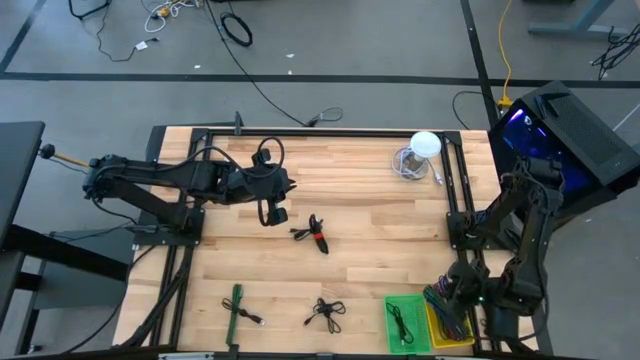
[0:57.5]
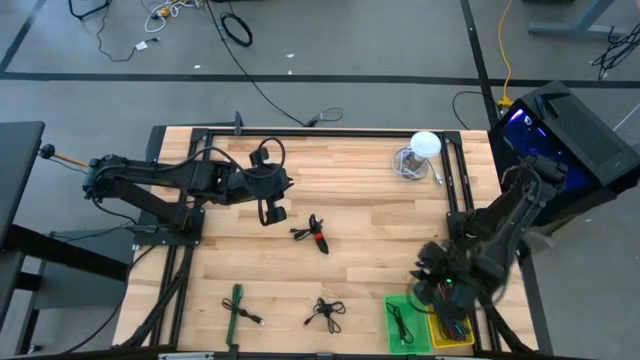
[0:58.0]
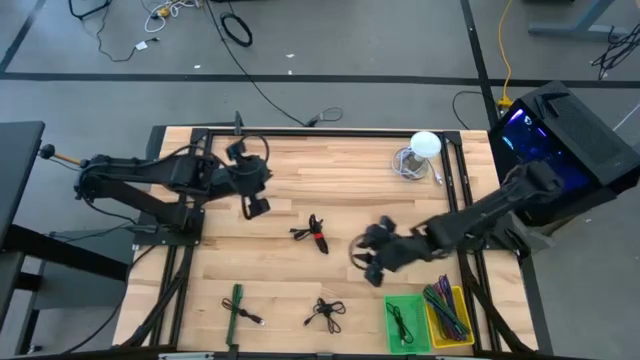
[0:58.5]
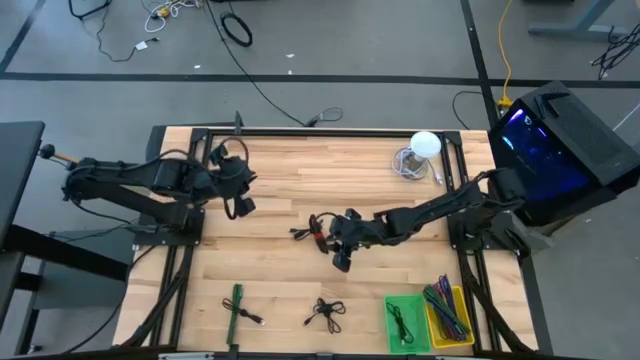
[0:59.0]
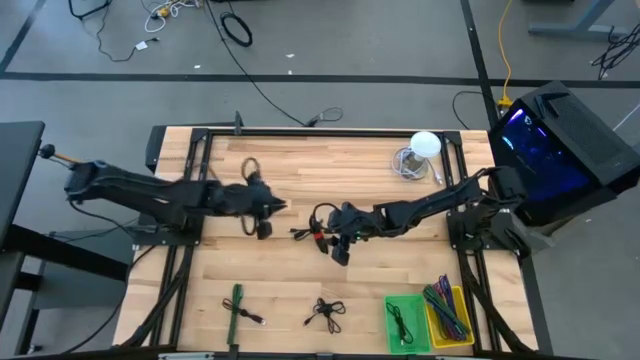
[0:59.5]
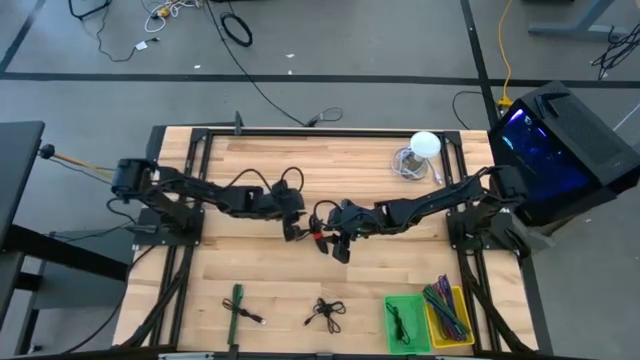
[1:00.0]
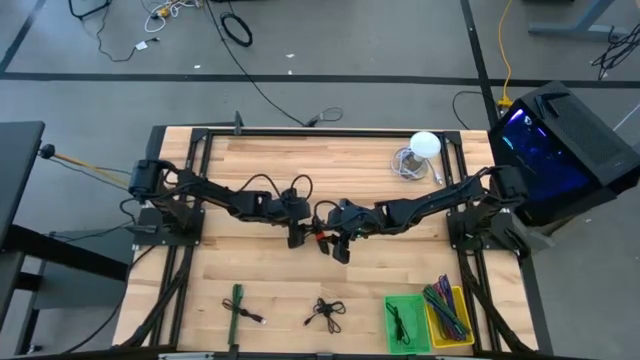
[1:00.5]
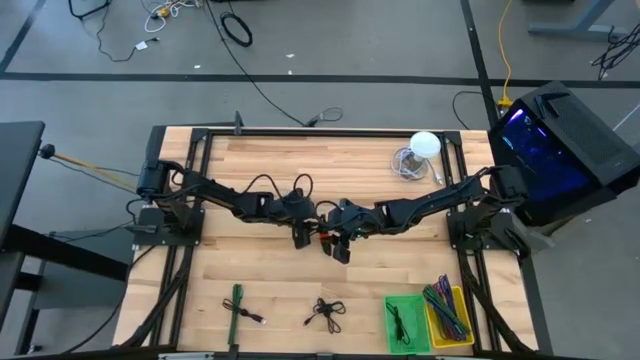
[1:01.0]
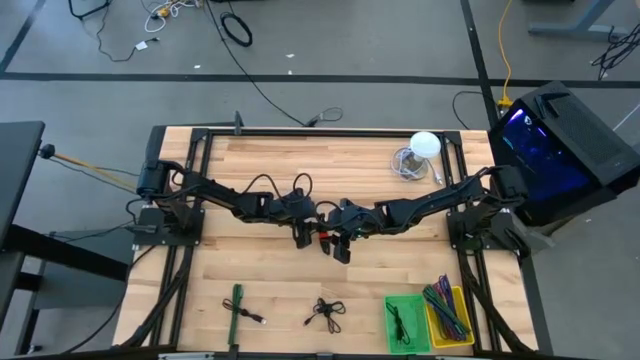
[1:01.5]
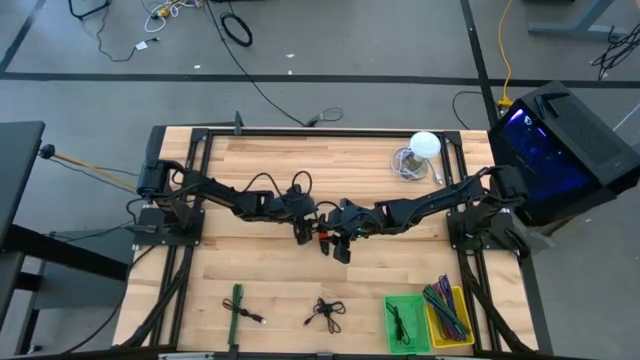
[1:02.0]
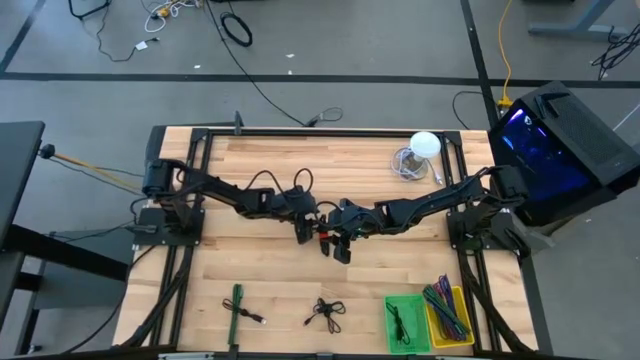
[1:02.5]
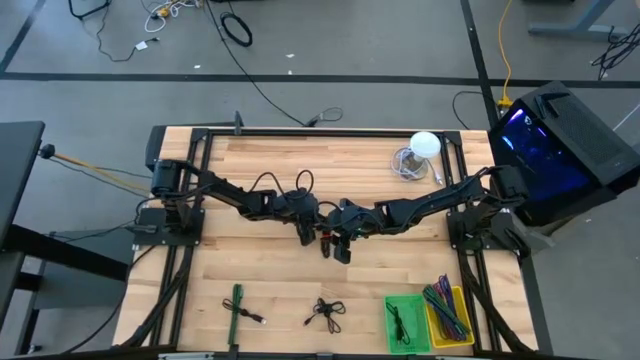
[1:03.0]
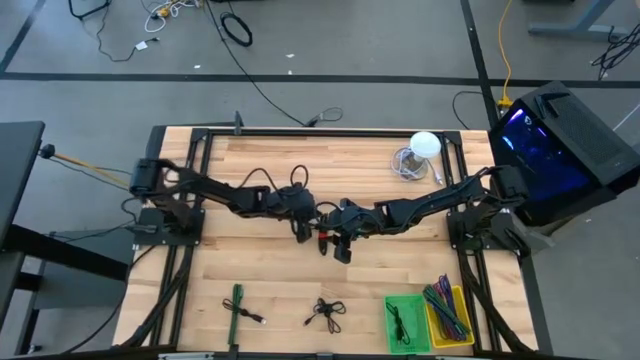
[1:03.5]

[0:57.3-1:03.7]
Task: Pick & Place USB Port
Put the black charger cable into the green basket

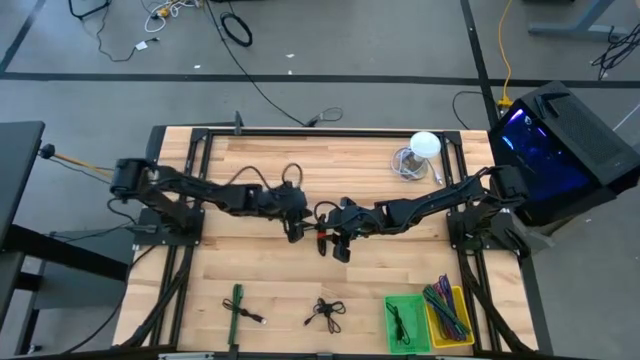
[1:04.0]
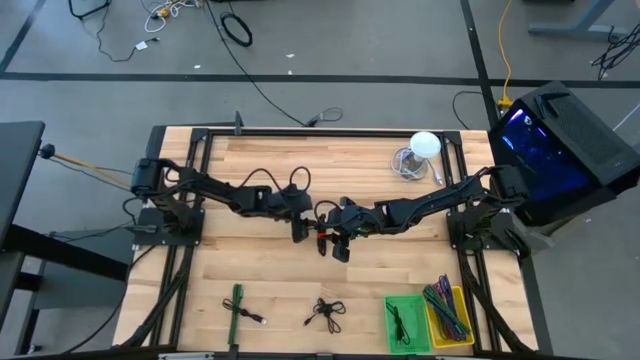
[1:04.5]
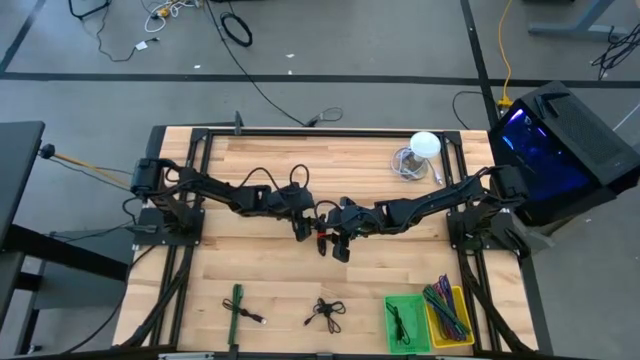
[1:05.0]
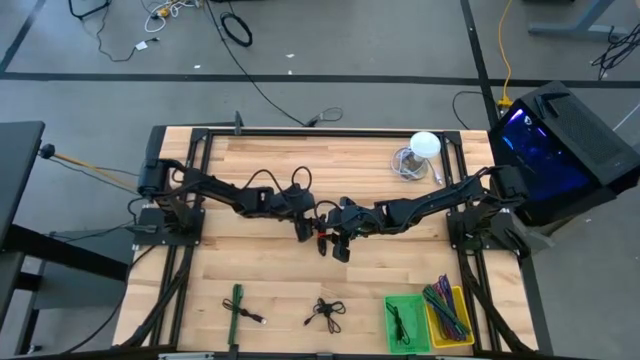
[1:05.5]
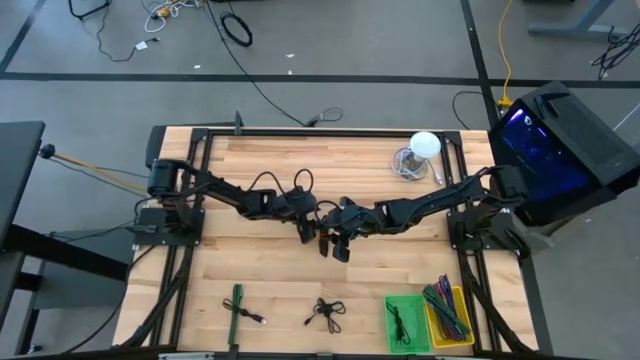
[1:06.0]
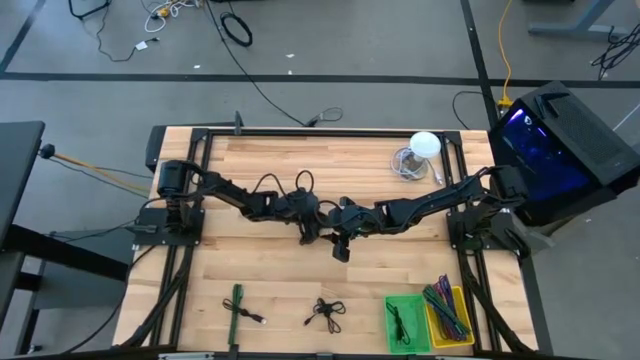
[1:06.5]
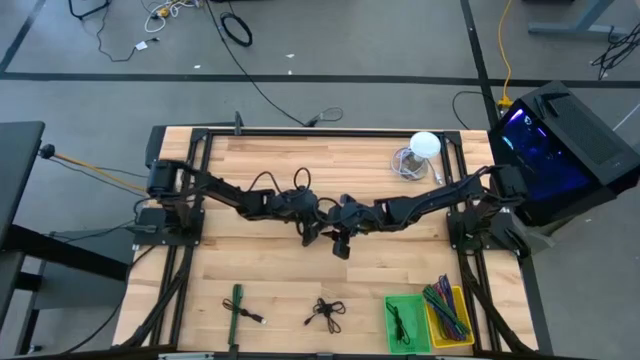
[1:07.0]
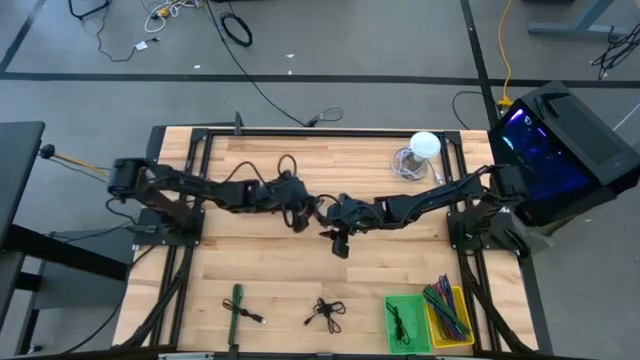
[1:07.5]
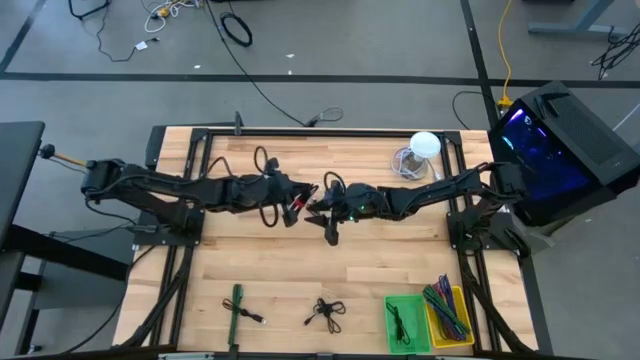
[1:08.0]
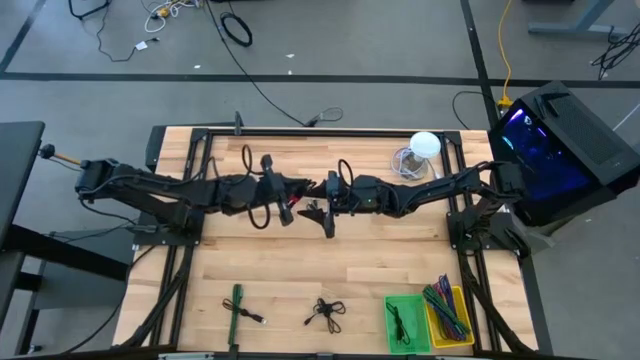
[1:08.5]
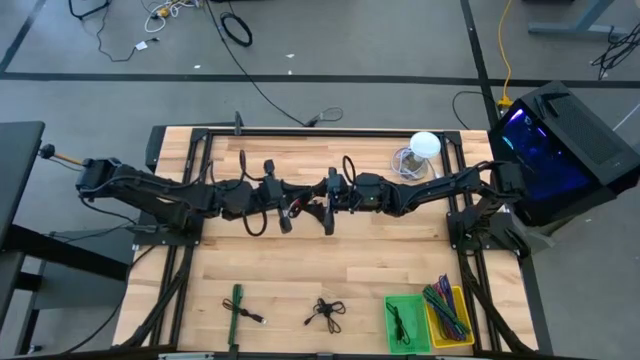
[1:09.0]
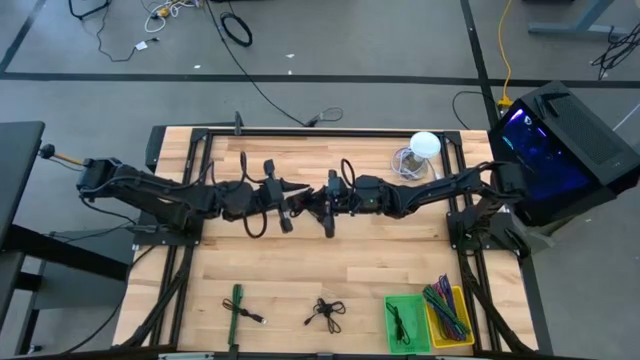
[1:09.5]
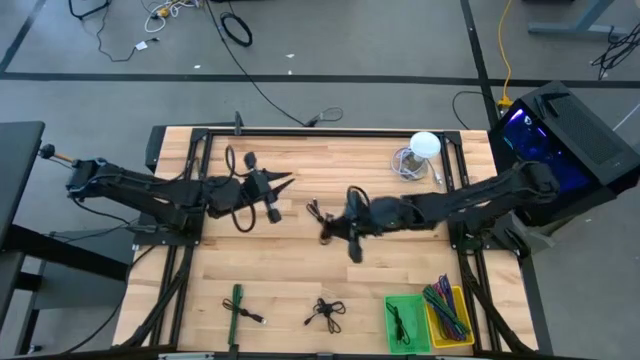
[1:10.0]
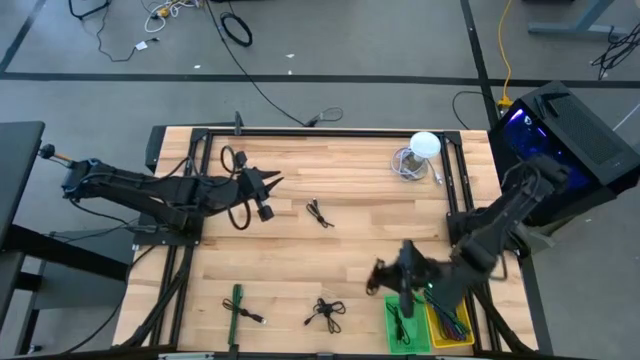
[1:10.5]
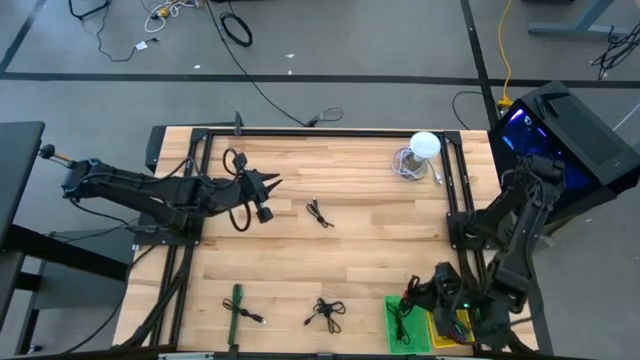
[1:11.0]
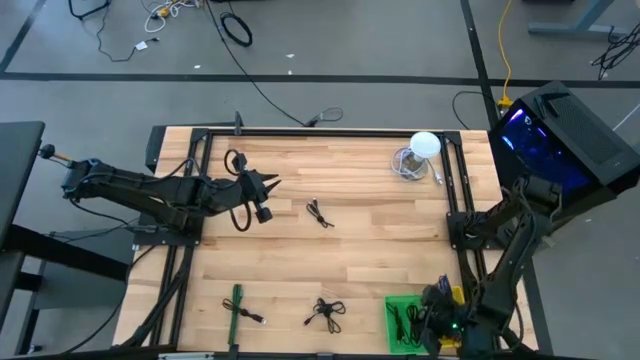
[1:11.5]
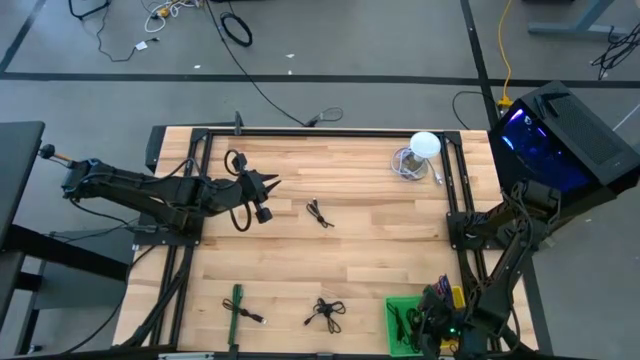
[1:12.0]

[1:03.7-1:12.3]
Put the black charger cable into the green basket

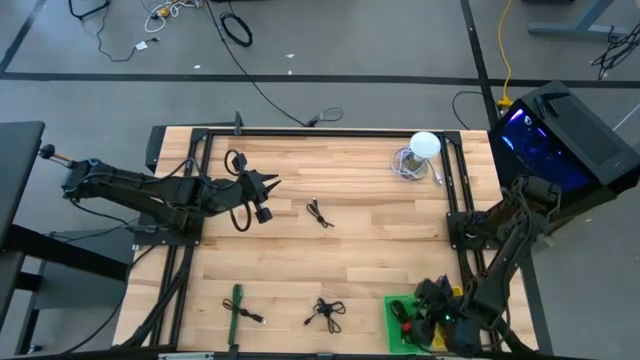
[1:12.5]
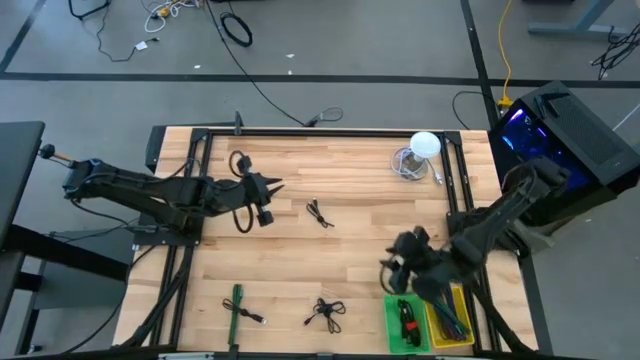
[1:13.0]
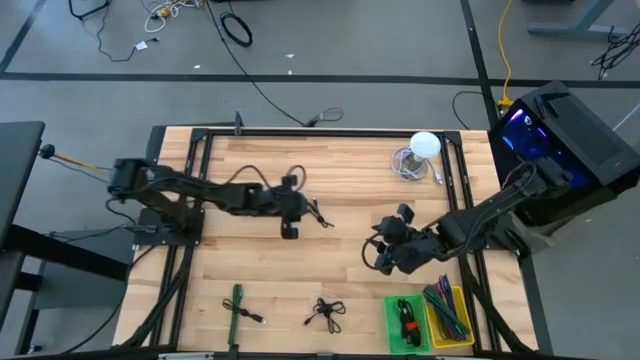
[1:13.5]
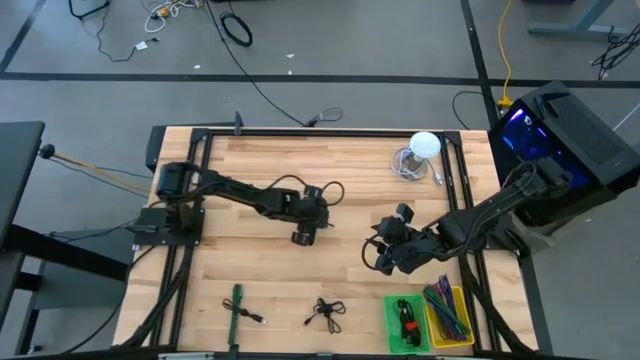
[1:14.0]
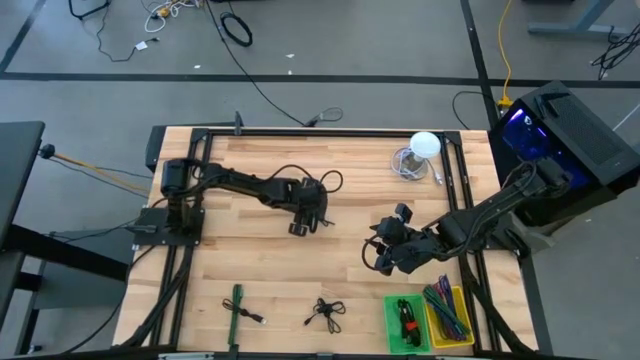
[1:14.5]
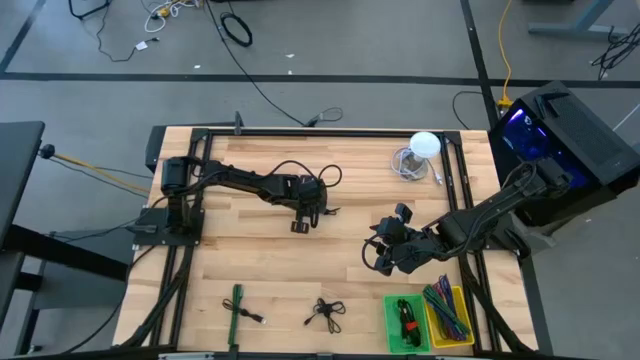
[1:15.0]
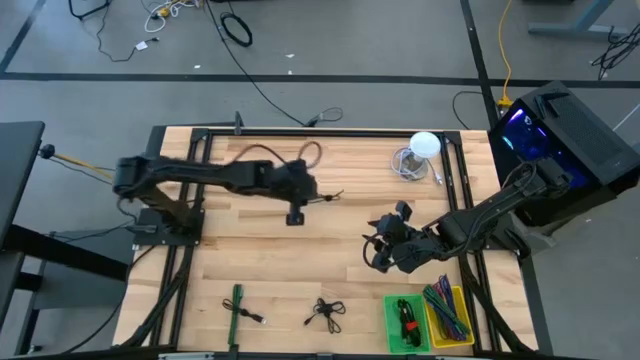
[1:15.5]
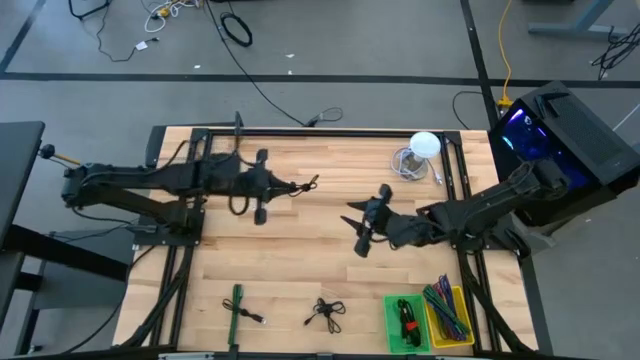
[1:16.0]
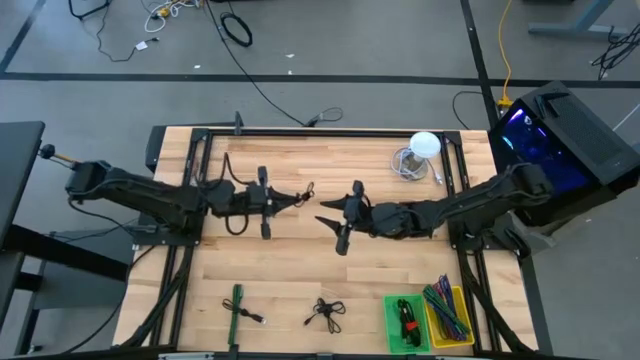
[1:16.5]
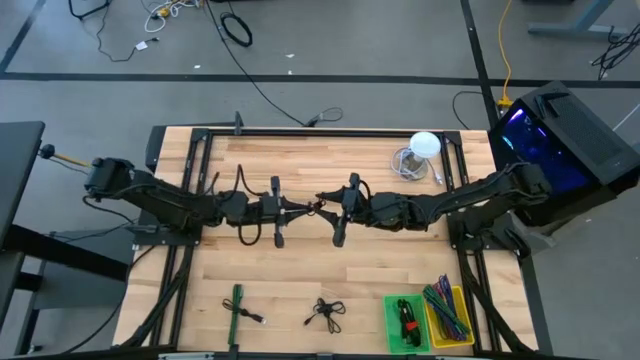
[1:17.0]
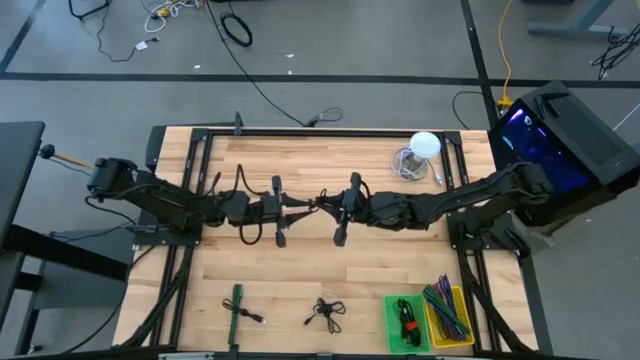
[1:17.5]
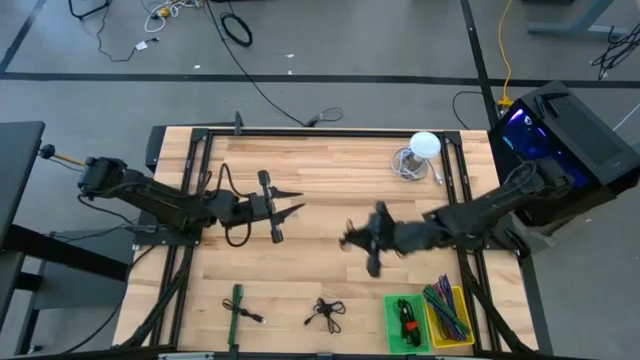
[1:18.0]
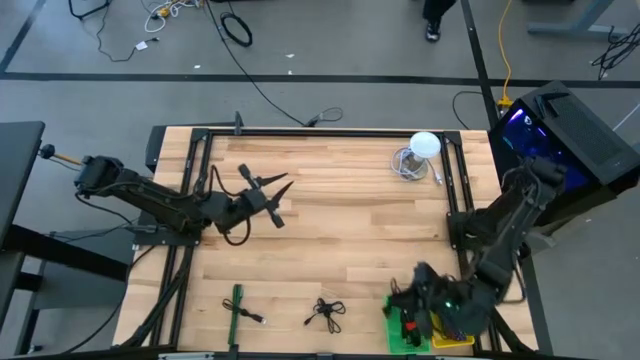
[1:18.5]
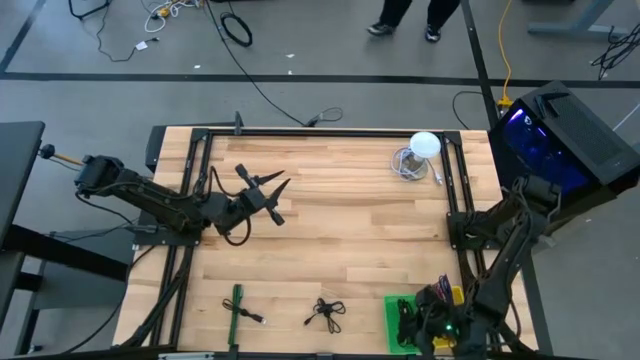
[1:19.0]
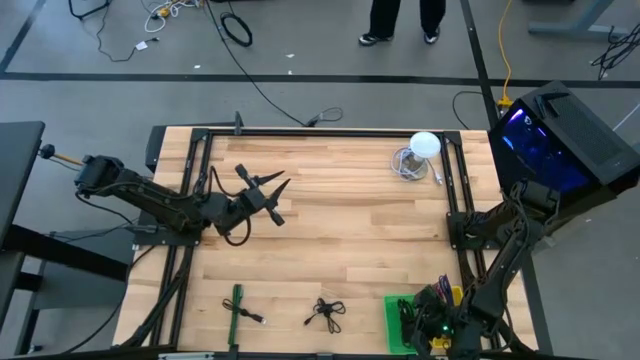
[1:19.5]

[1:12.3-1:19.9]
Put the black charger cable into the green basket
